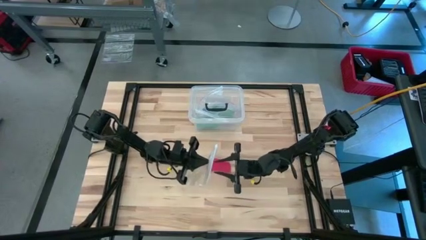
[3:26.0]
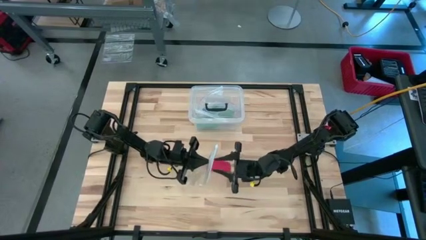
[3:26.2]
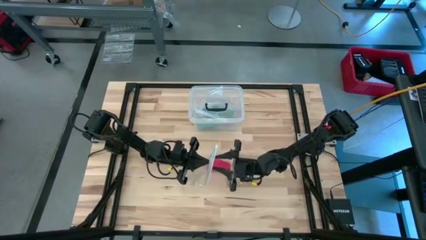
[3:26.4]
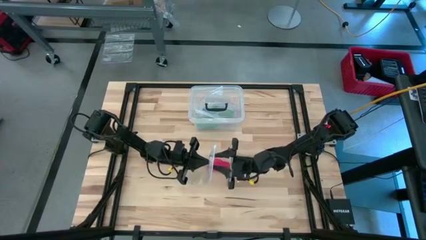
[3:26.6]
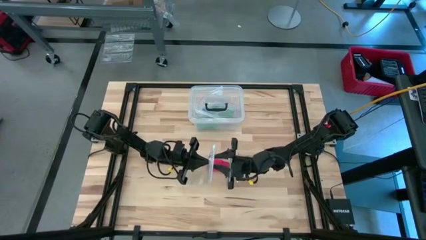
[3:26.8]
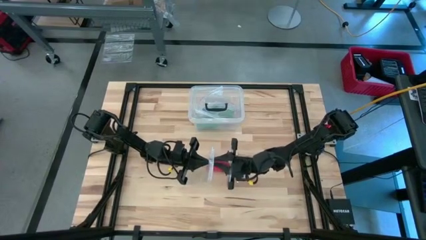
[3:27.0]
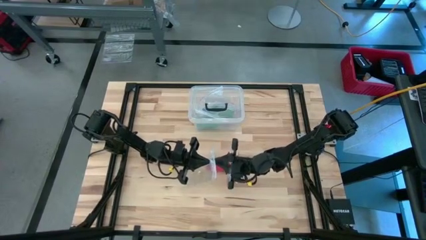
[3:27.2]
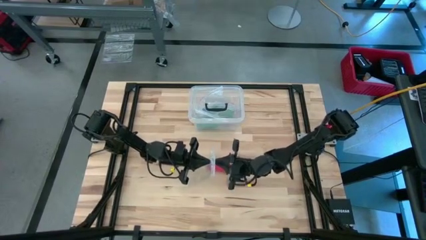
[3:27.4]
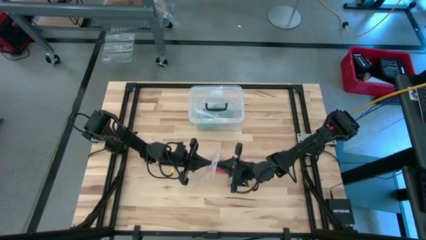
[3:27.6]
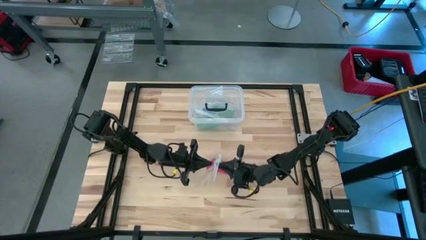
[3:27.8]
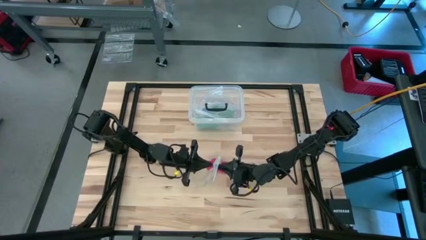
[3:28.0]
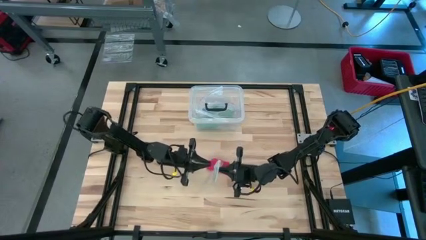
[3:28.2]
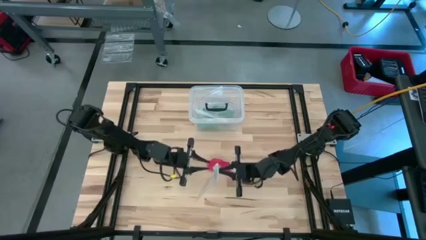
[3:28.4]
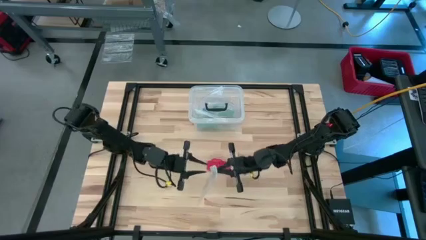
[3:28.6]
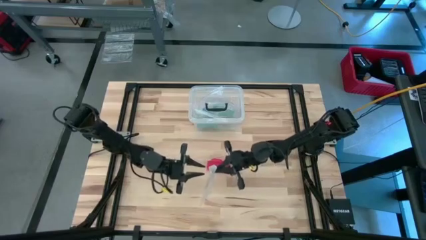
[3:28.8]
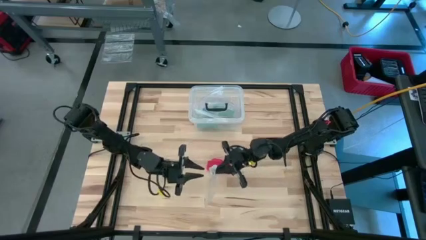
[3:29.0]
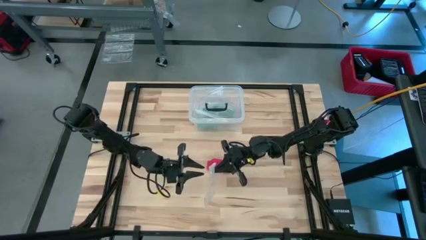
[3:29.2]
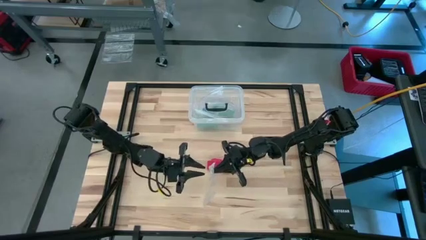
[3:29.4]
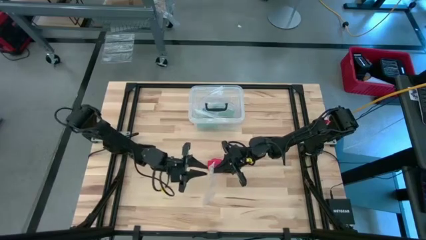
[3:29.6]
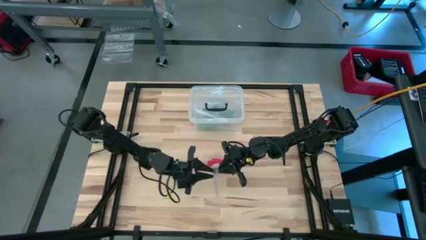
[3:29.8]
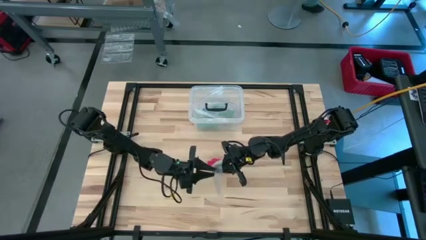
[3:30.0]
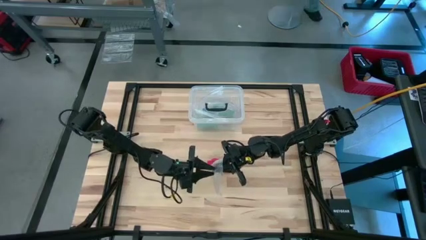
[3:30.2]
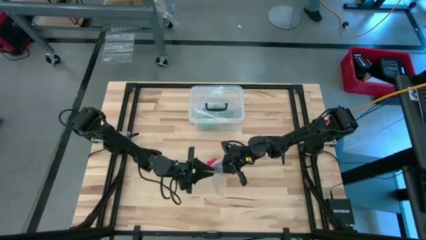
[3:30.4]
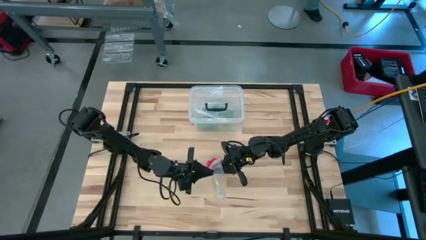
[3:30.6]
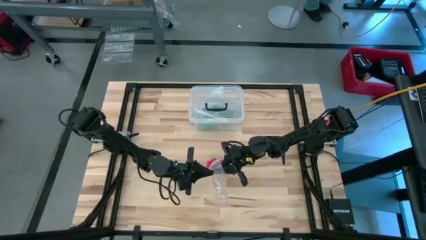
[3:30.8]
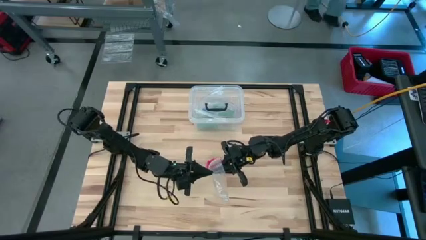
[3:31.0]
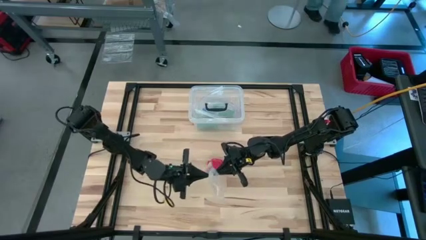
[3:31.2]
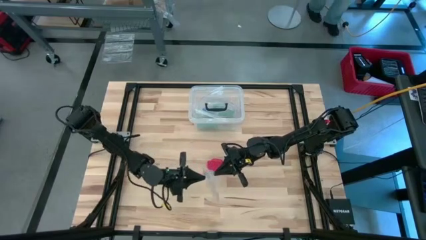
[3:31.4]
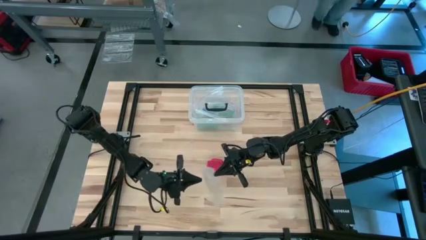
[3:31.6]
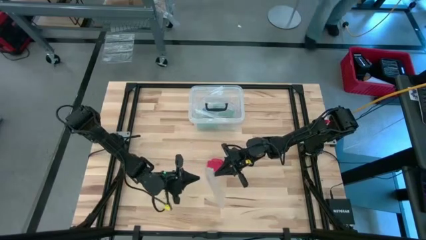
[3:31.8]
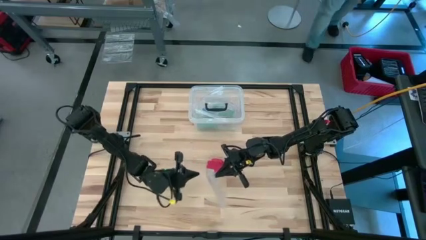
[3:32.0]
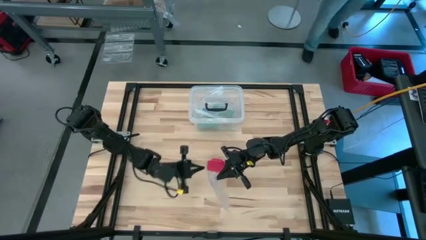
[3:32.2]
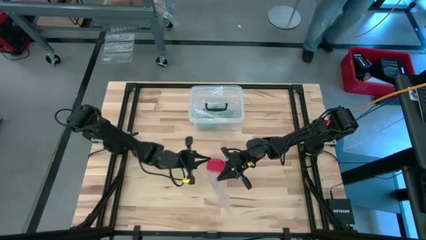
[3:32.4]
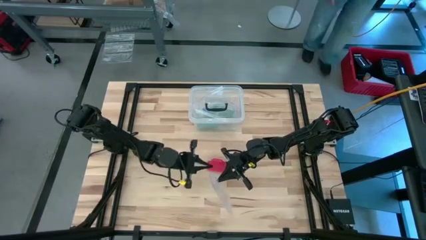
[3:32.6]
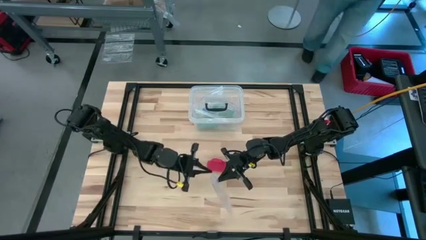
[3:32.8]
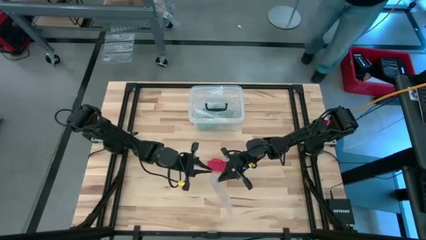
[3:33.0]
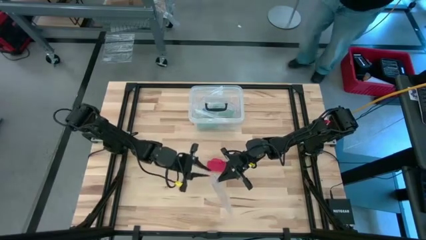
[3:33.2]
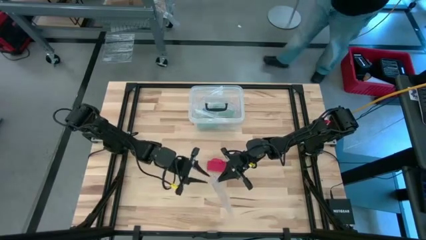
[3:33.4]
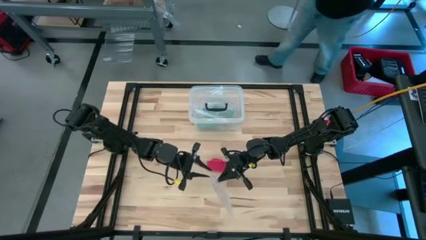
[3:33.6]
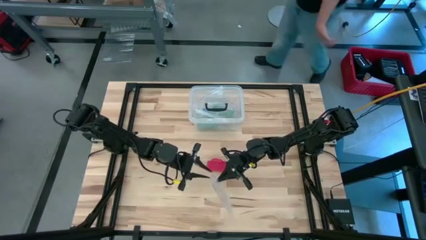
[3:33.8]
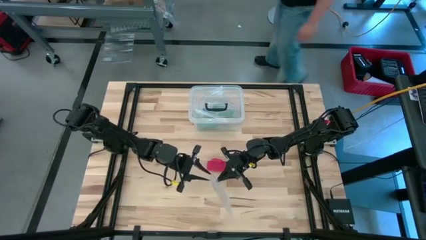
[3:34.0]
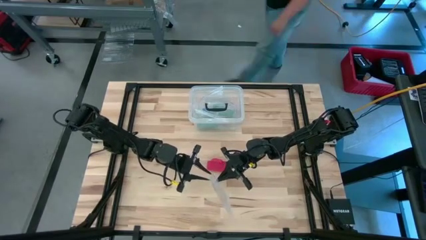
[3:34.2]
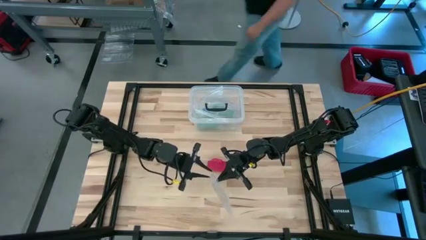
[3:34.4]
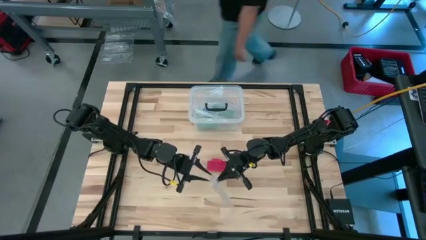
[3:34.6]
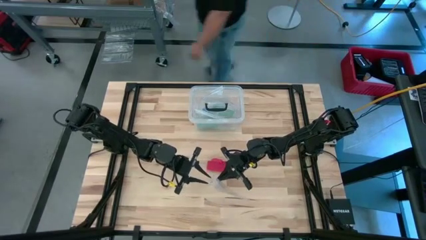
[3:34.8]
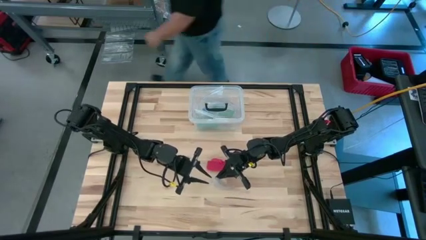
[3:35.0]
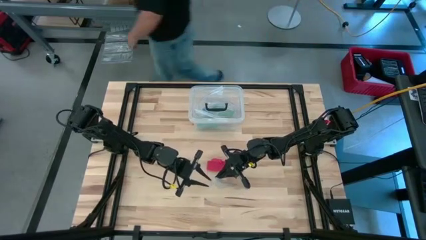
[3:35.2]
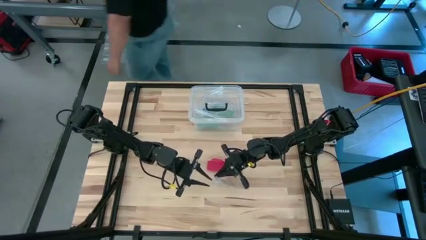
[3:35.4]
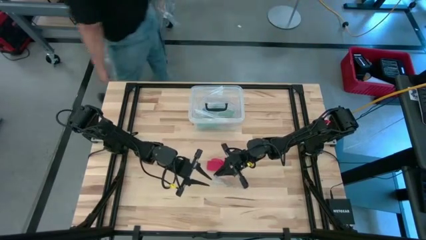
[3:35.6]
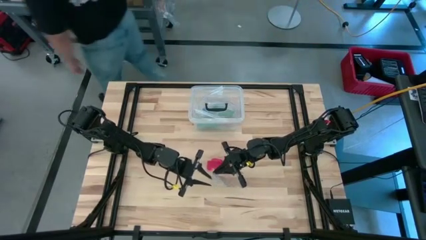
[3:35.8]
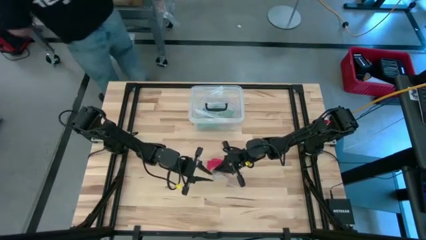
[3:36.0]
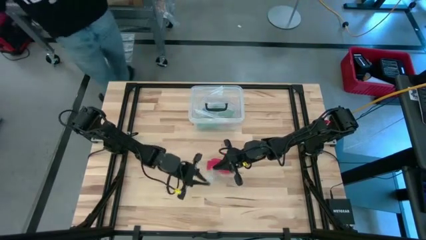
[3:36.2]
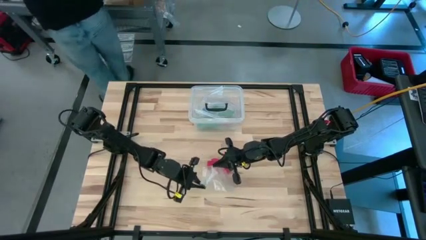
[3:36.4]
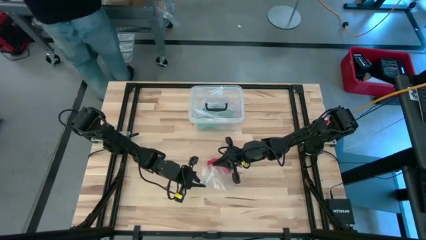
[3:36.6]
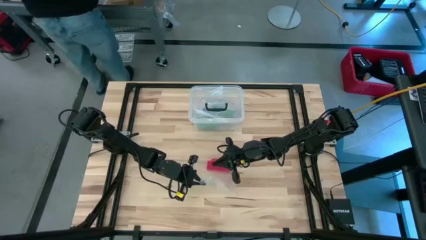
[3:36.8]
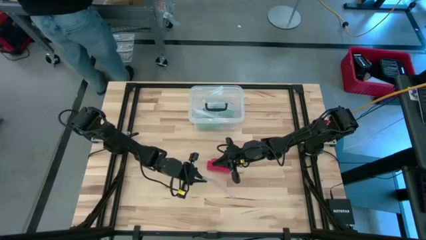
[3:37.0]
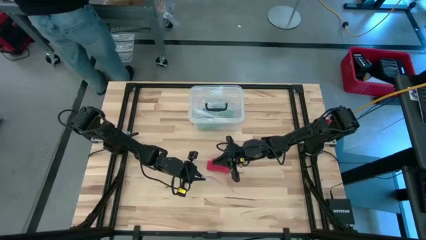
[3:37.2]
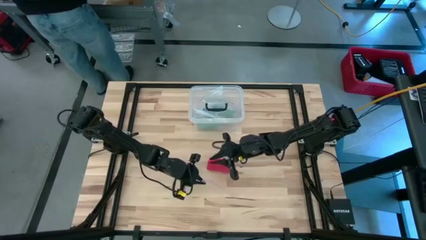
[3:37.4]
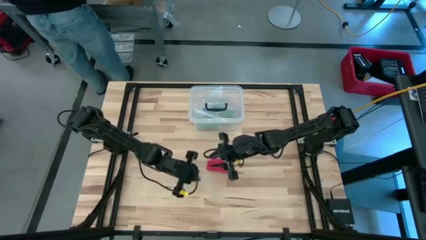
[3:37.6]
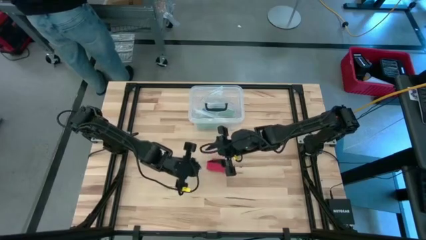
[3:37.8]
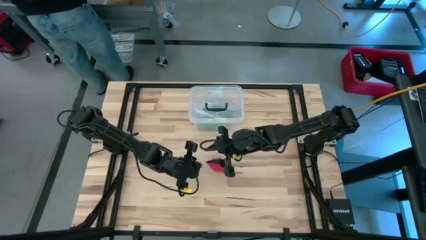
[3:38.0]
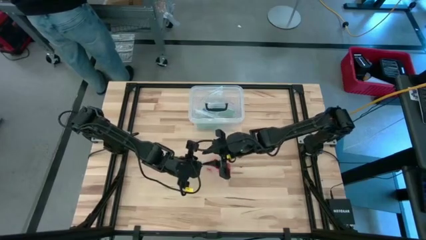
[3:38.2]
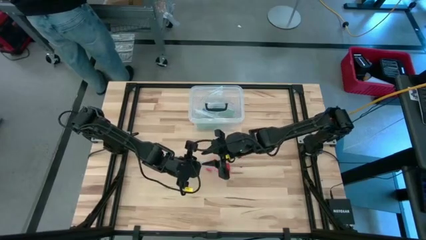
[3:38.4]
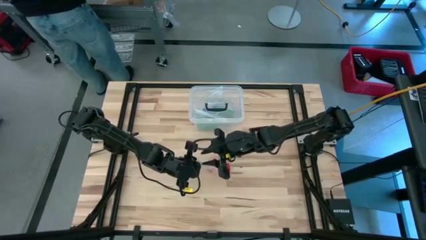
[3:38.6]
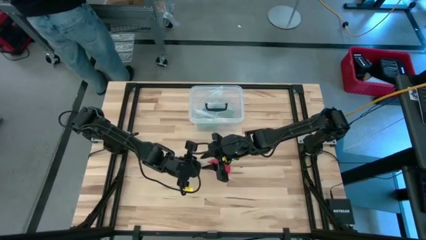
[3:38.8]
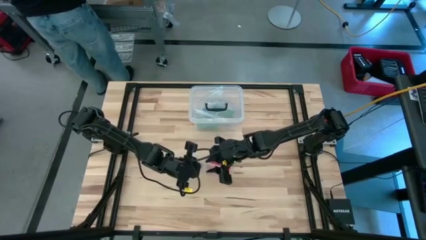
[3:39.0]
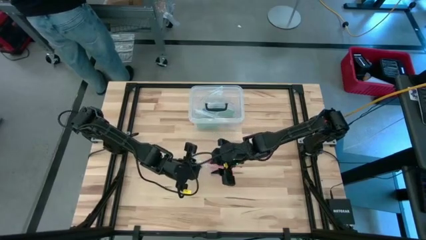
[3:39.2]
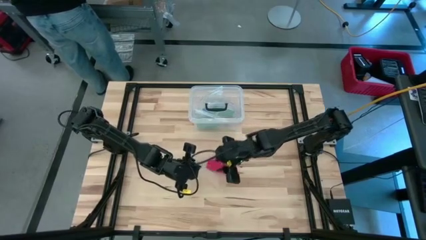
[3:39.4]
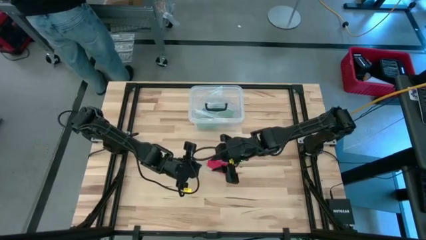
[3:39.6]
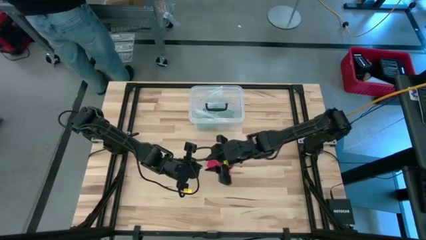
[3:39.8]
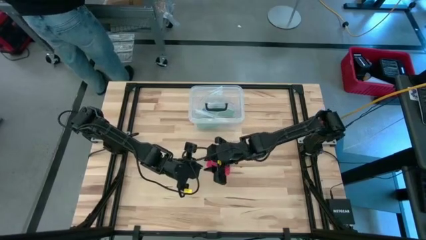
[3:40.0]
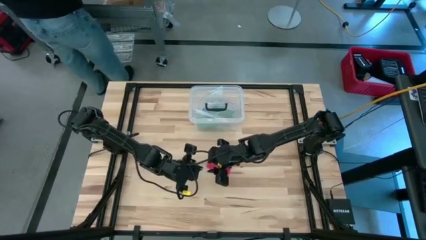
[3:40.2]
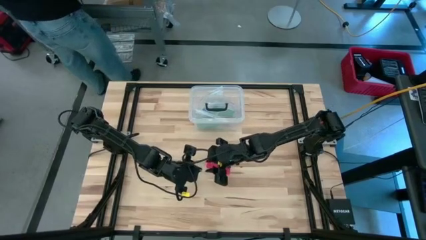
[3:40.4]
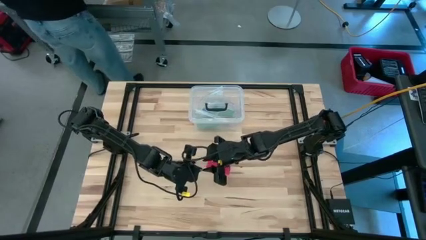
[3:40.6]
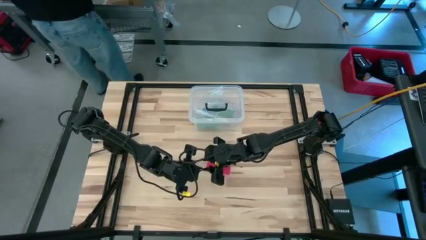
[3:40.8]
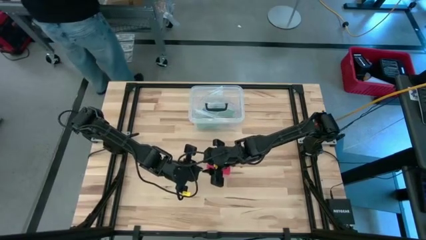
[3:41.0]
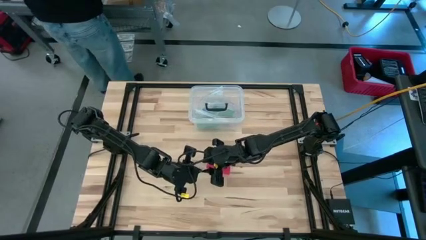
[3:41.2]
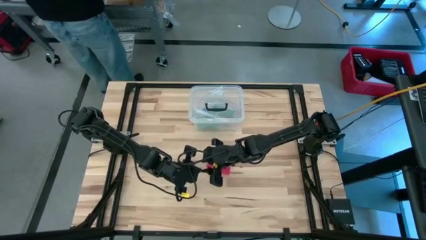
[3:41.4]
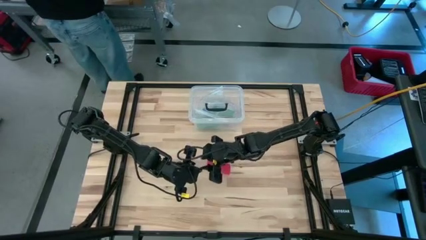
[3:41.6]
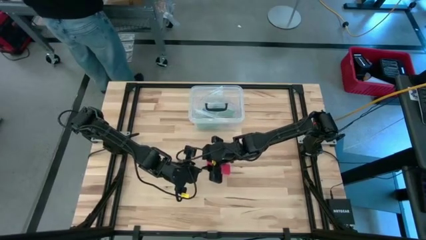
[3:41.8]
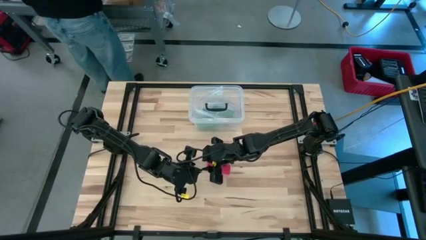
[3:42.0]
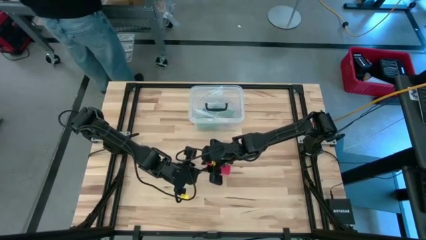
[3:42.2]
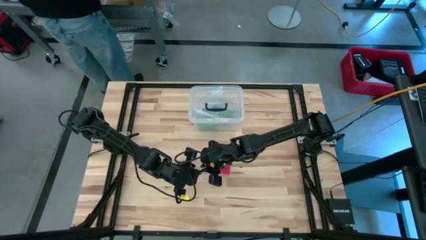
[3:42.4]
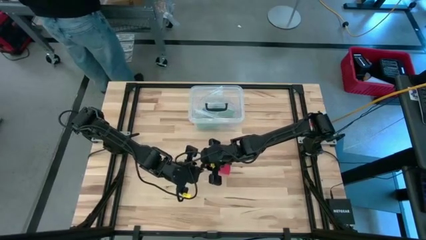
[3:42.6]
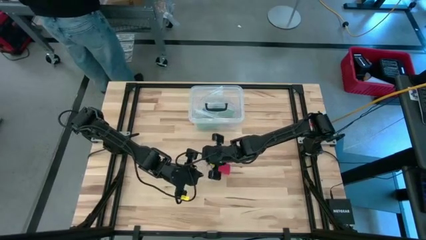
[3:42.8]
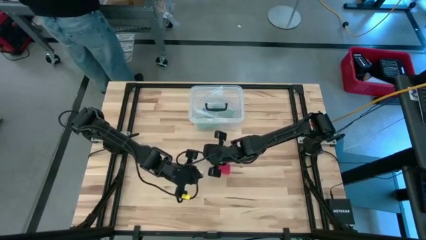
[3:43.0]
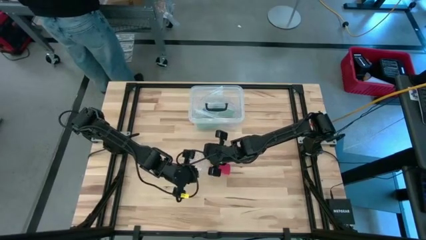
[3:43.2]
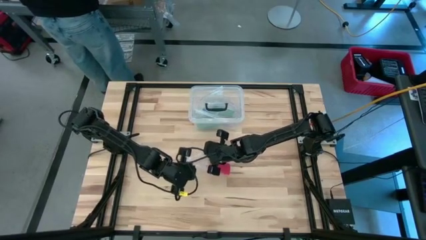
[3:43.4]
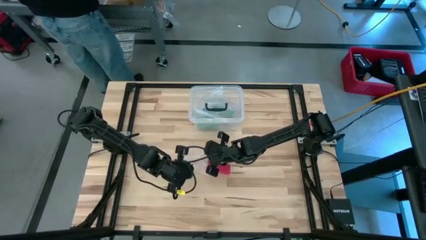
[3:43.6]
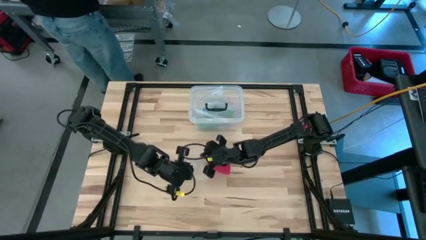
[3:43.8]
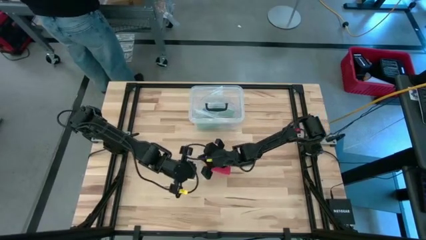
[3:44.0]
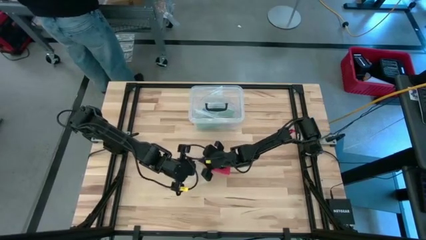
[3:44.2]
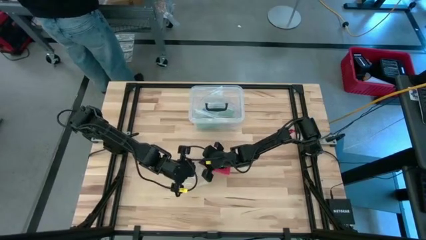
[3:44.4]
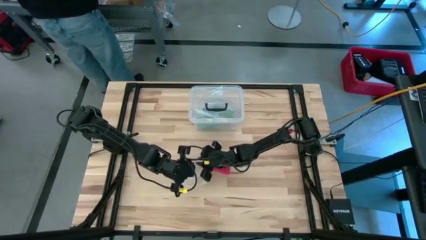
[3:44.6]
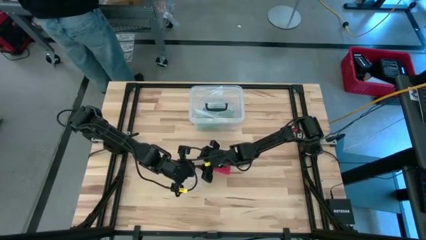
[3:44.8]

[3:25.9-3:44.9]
Task: Roll bandage
Open the transparent zip bag
